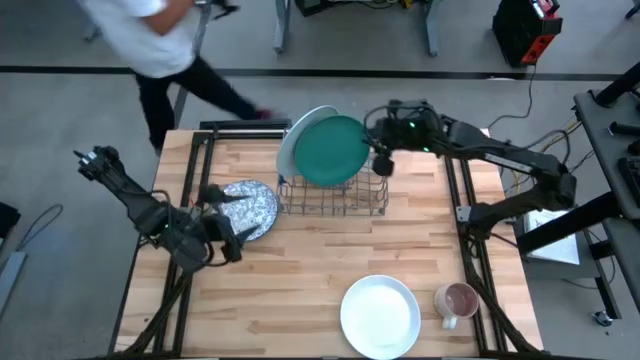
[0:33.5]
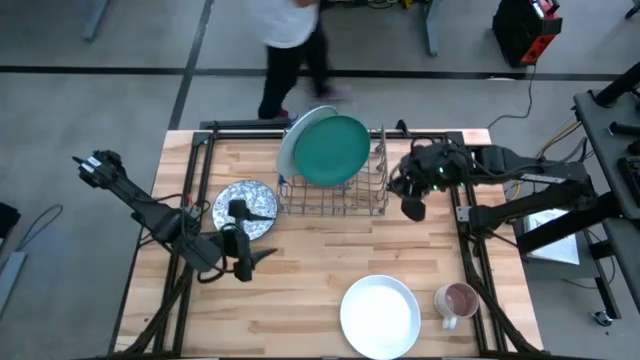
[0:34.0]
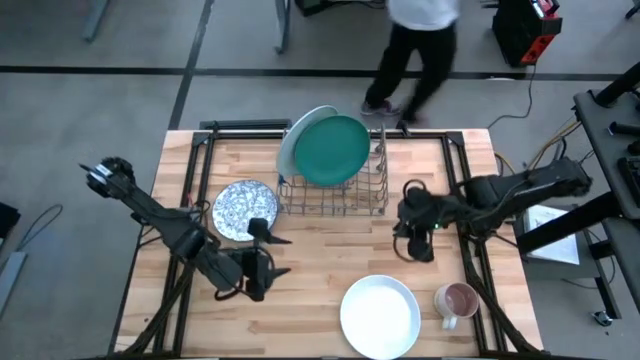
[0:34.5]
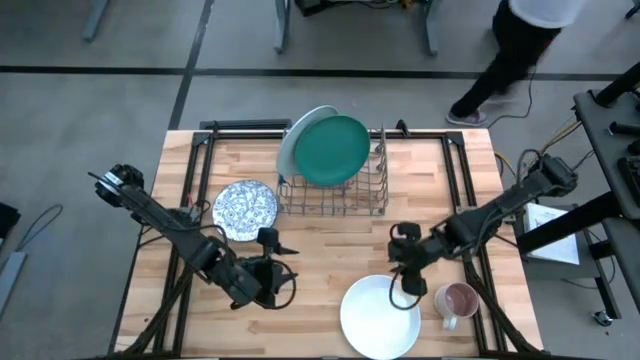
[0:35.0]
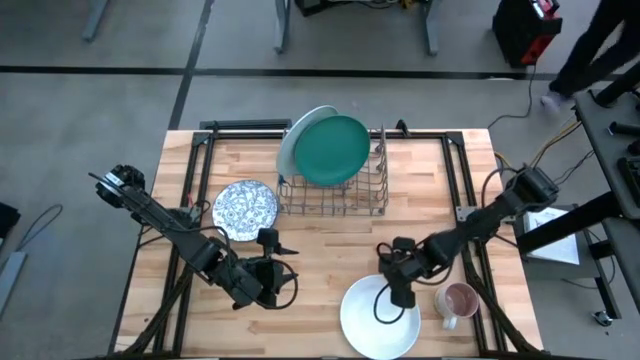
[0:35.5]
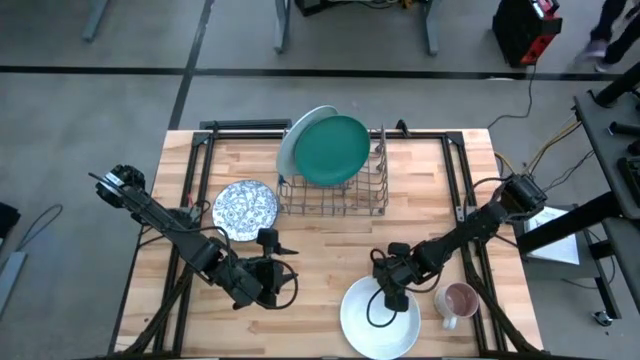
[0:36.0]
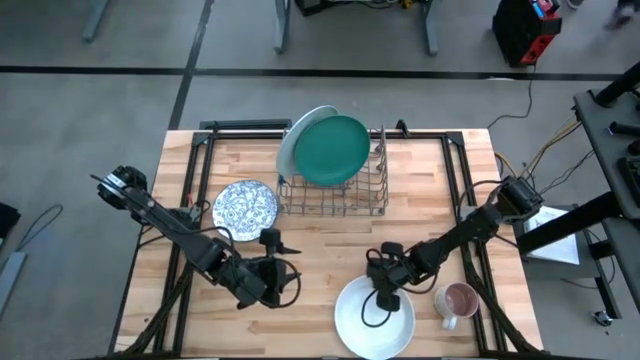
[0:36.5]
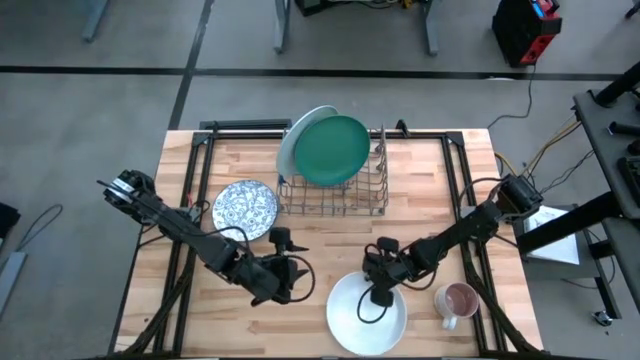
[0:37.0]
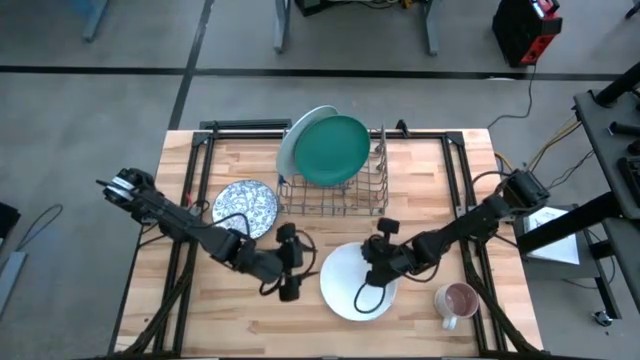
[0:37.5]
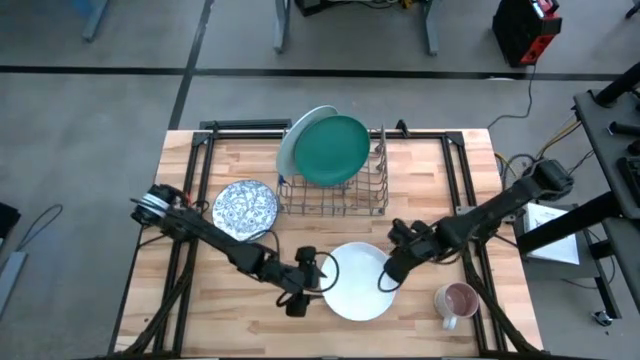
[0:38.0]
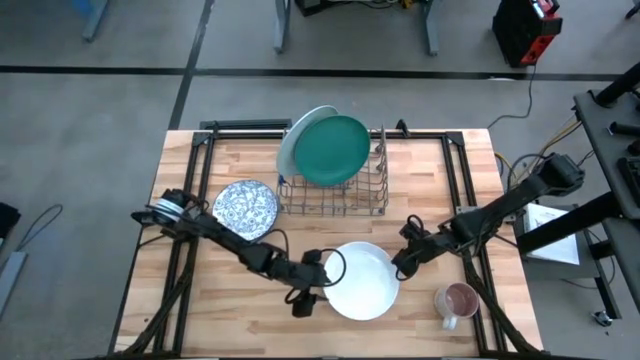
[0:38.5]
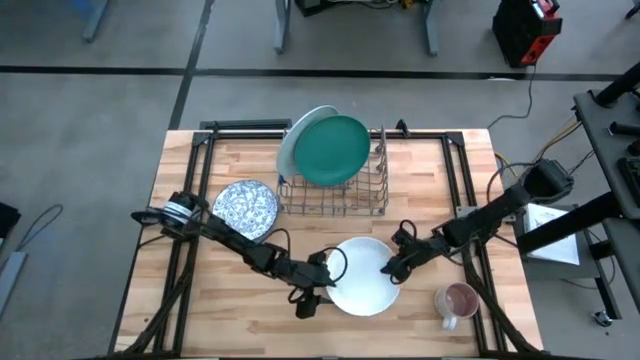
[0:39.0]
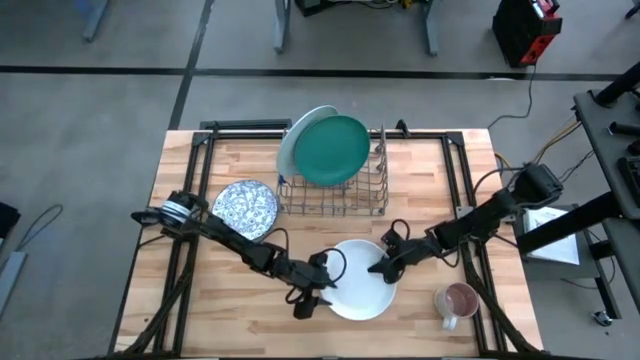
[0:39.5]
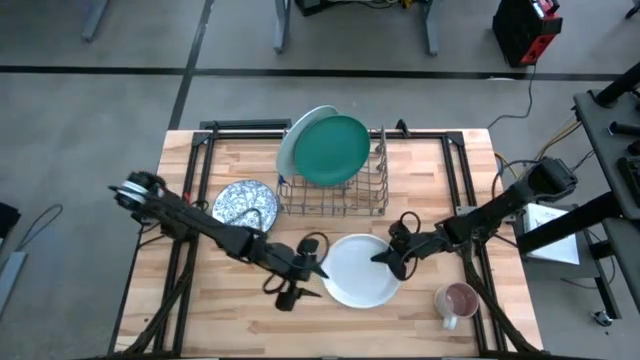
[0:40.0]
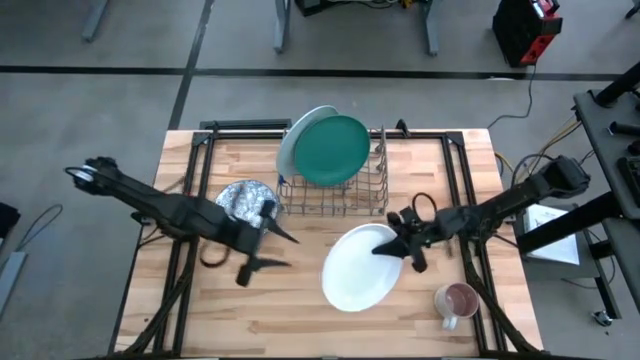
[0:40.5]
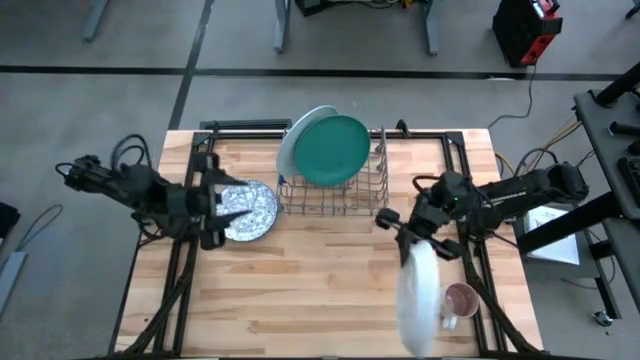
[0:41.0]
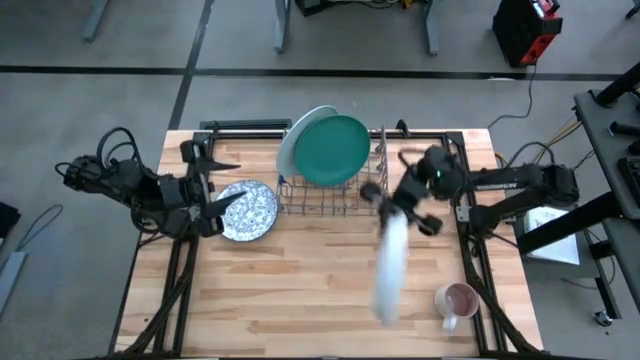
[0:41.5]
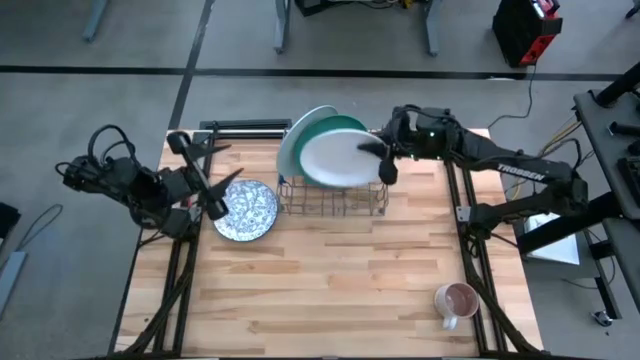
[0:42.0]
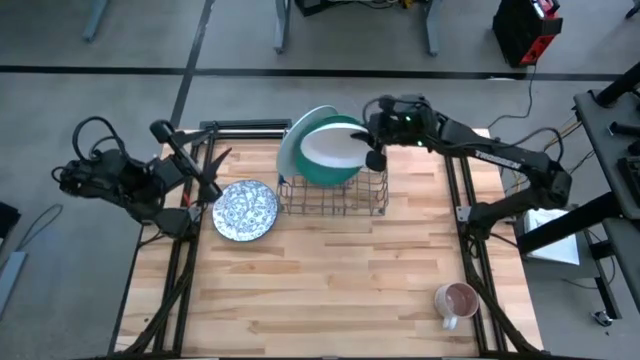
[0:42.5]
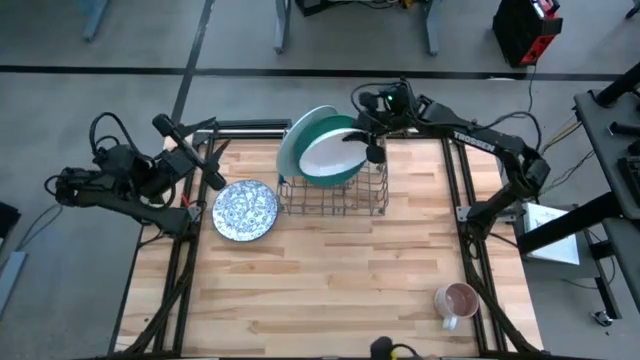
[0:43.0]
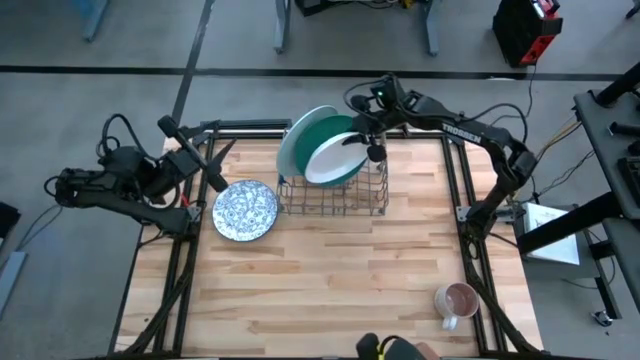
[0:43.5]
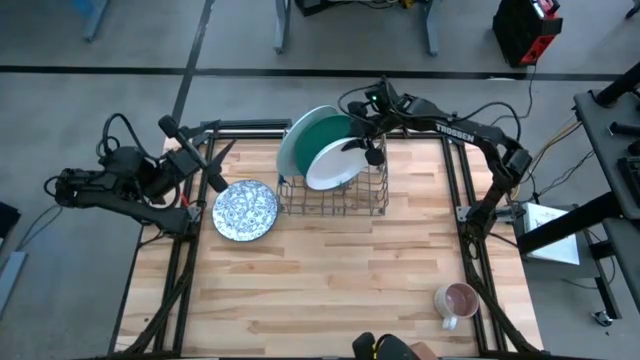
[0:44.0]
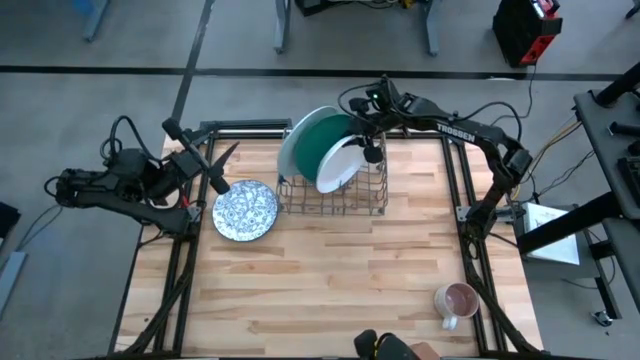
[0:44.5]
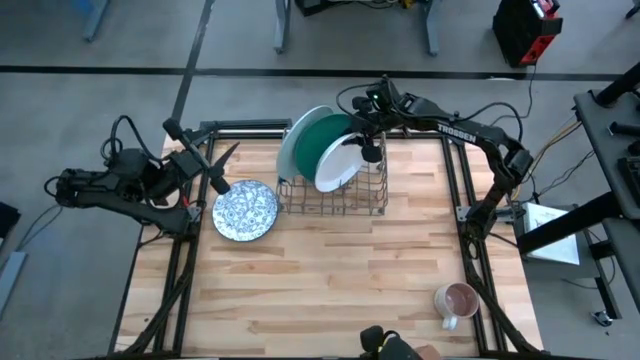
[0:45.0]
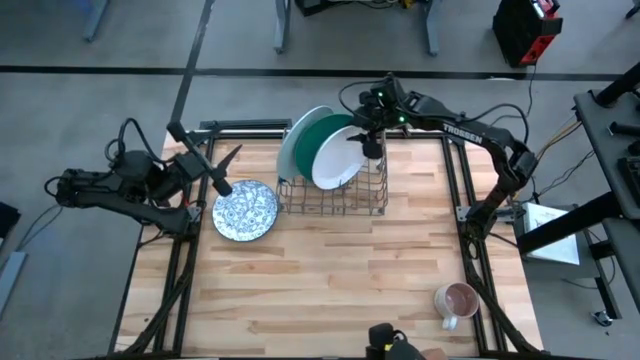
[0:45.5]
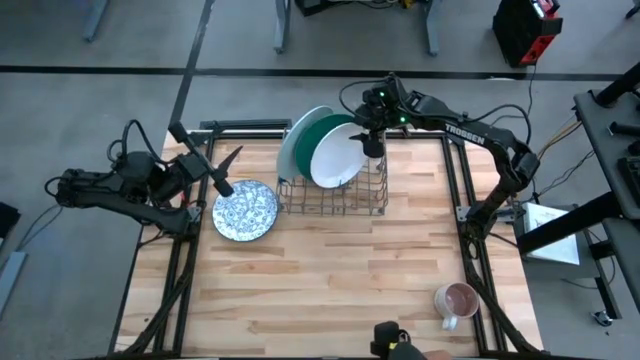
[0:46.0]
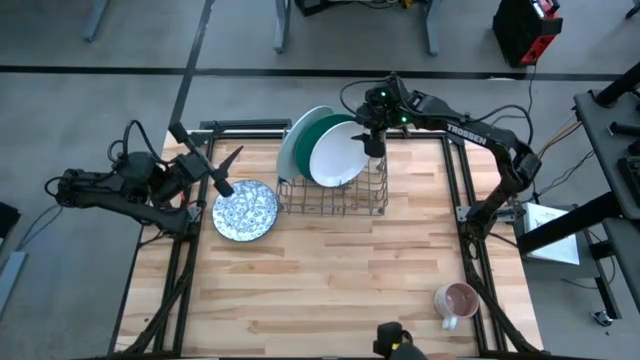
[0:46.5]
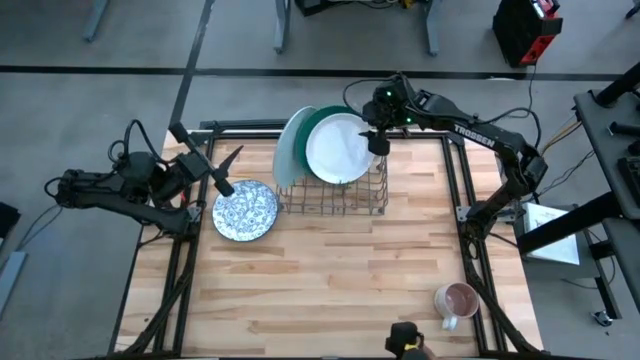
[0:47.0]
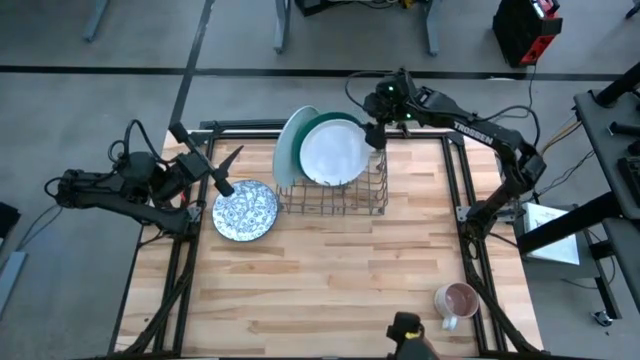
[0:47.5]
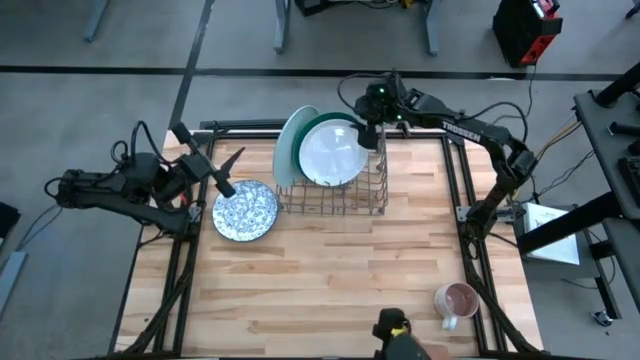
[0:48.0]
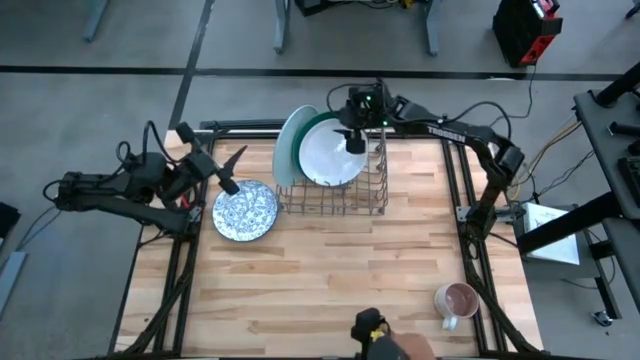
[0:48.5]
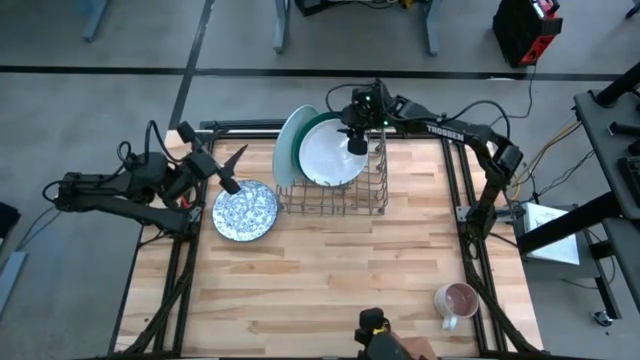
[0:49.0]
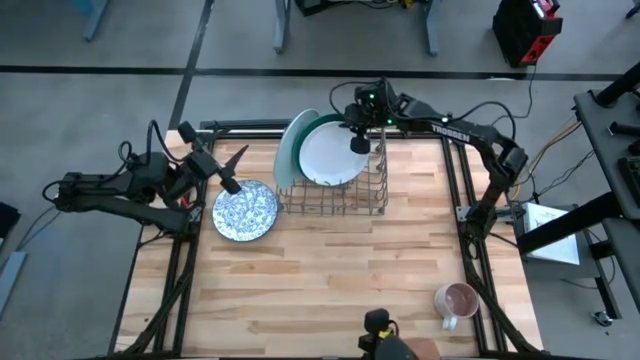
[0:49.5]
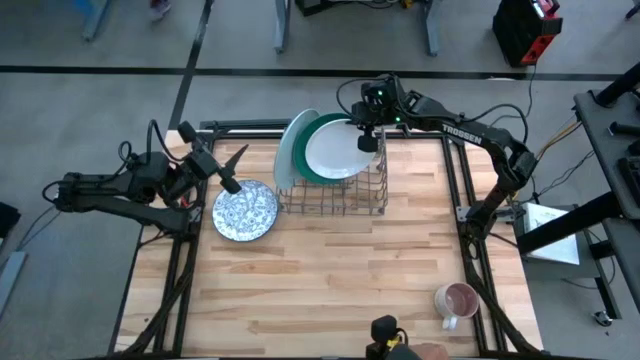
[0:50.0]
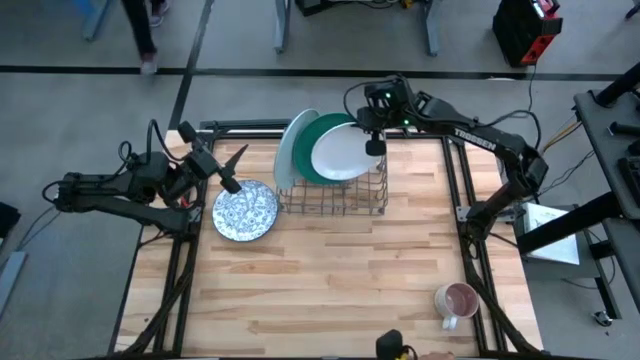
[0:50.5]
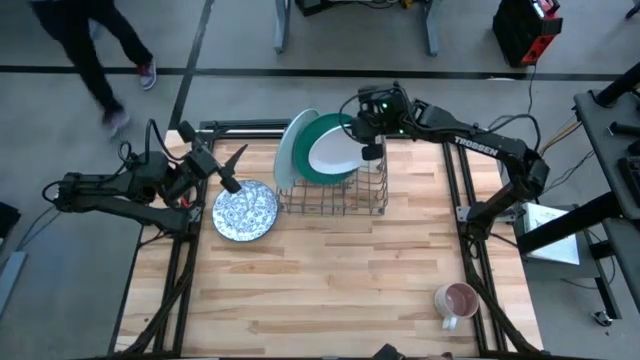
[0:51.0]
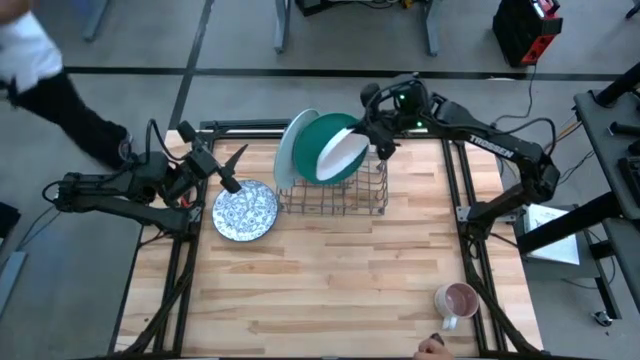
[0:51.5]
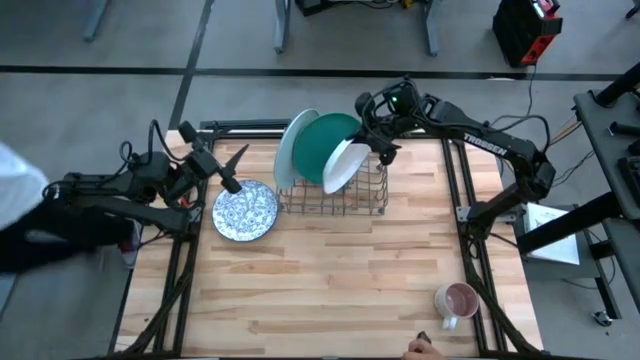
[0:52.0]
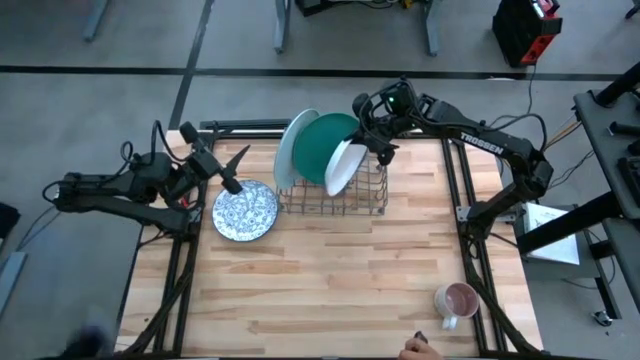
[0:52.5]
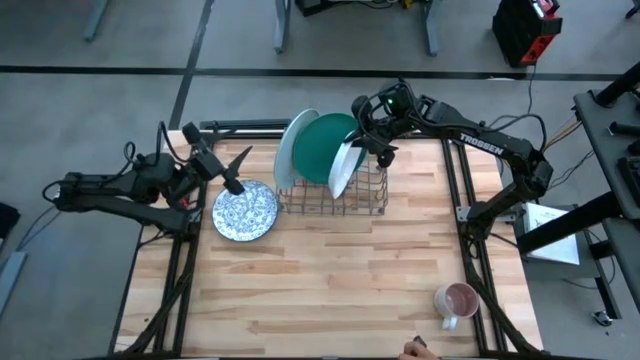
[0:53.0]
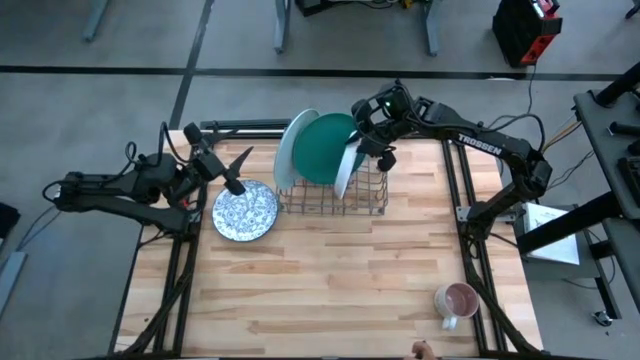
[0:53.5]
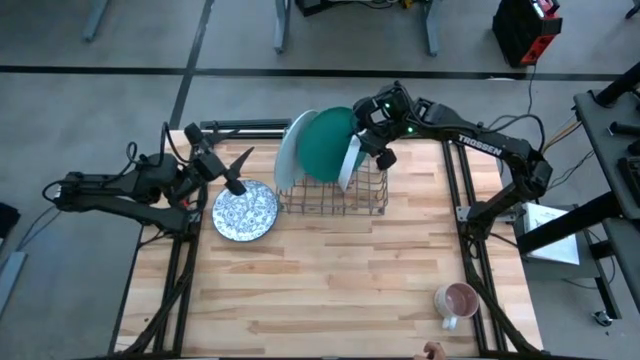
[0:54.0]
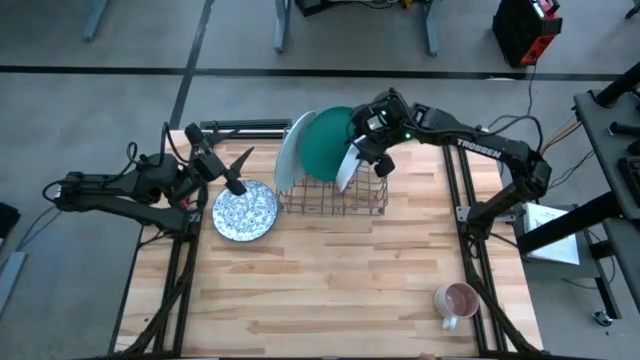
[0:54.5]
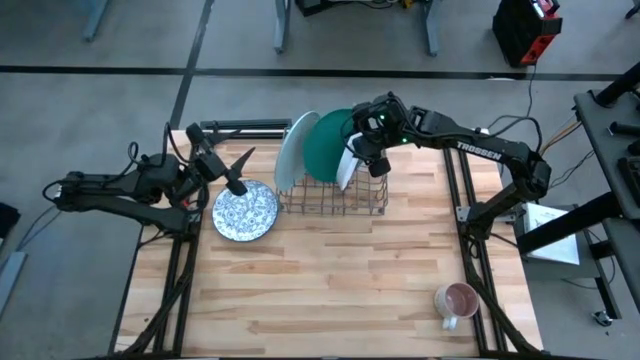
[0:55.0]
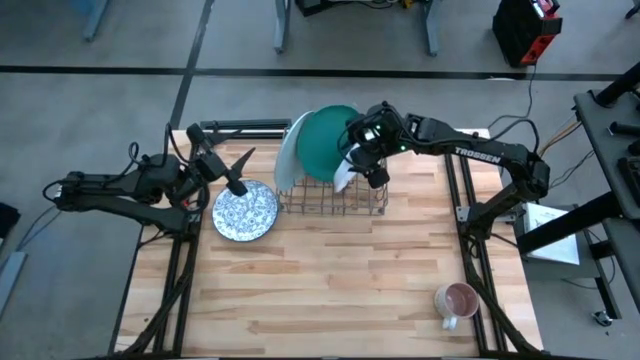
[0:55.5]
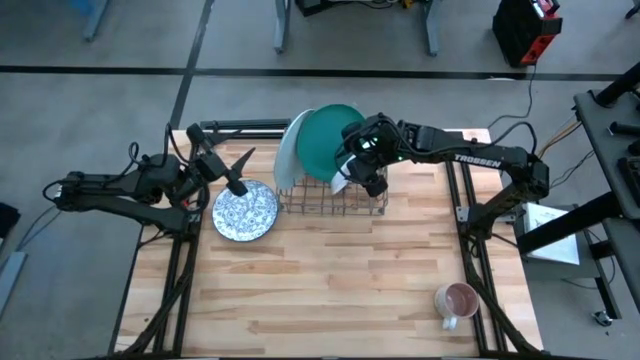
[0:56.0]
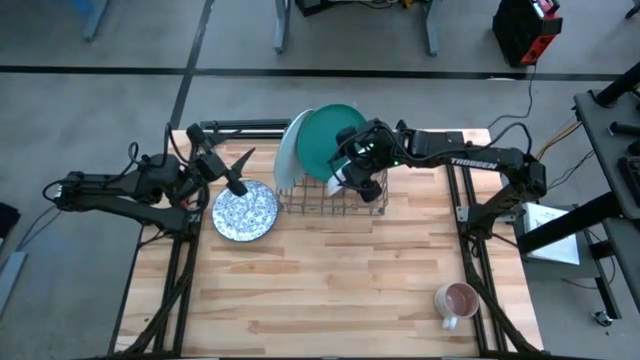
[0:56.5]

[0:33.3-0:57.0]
Task: Sort dishes
Put the white plate into the dish rack
